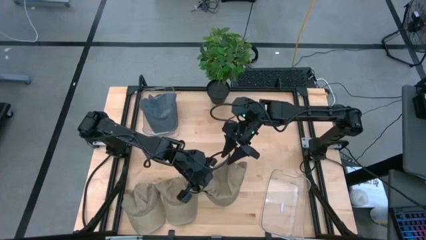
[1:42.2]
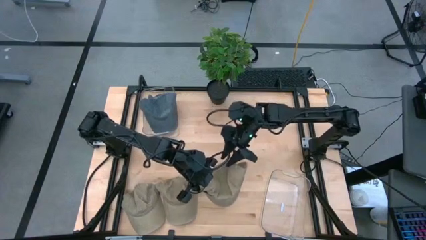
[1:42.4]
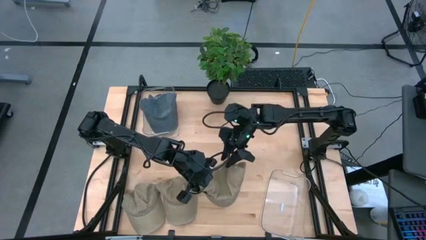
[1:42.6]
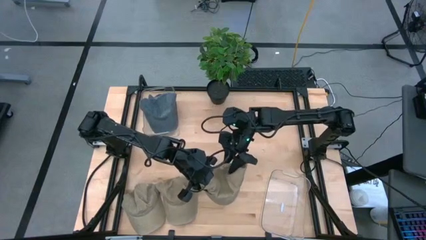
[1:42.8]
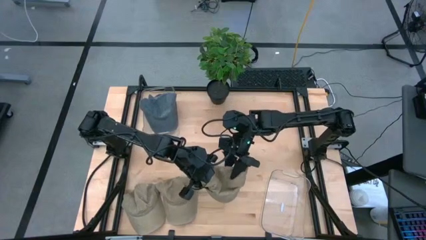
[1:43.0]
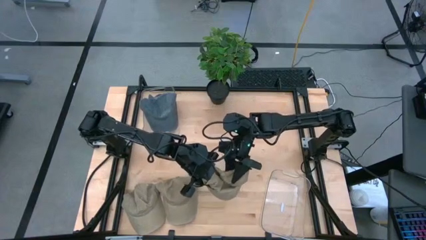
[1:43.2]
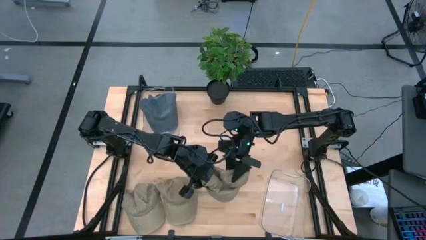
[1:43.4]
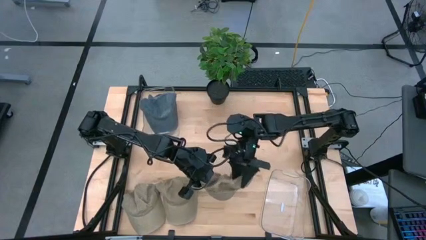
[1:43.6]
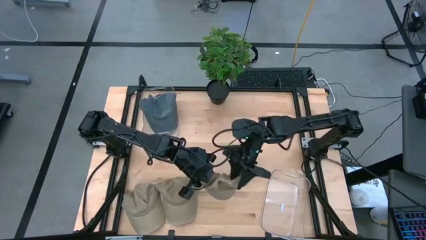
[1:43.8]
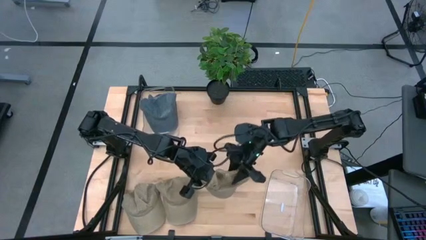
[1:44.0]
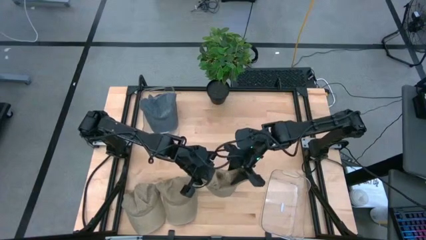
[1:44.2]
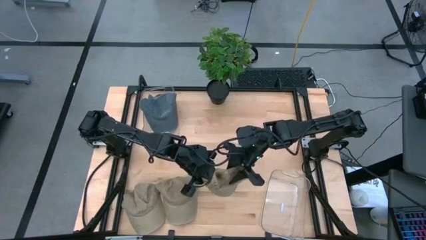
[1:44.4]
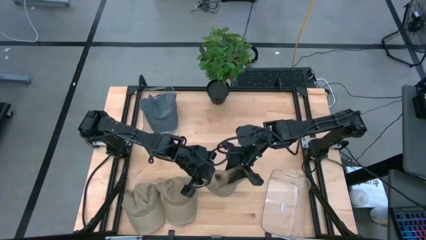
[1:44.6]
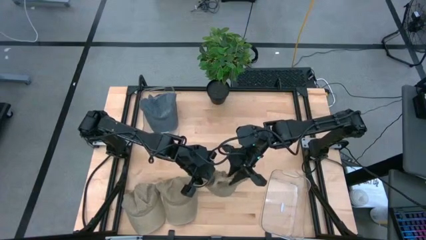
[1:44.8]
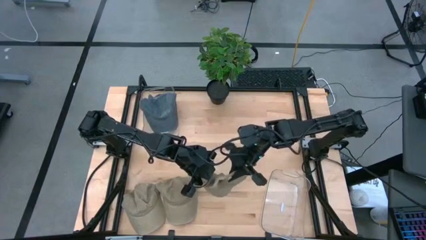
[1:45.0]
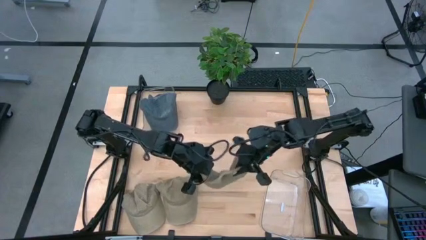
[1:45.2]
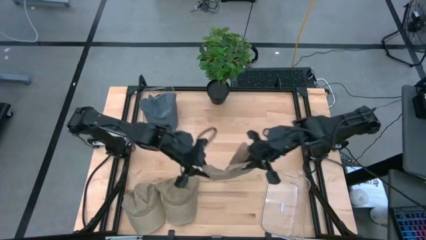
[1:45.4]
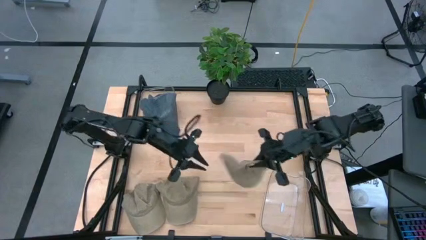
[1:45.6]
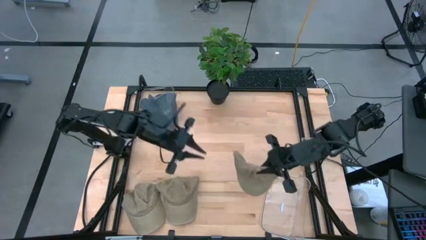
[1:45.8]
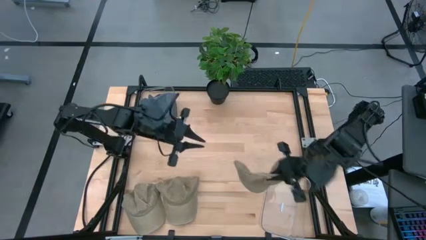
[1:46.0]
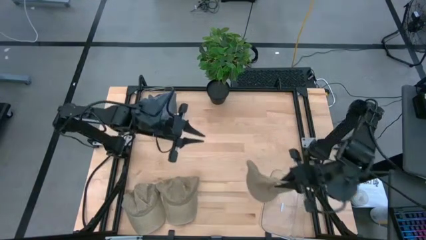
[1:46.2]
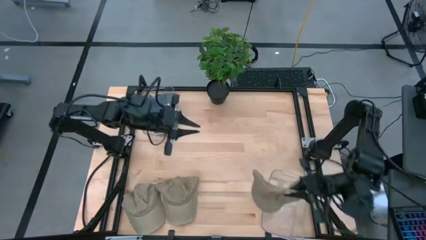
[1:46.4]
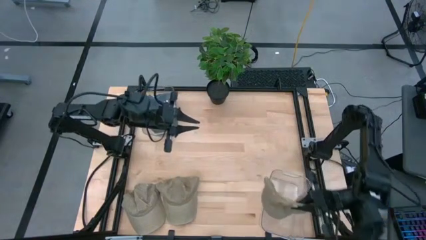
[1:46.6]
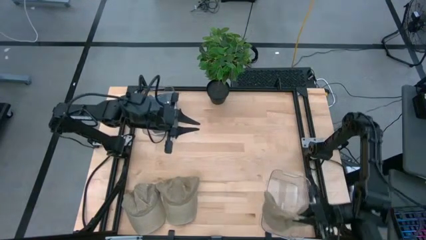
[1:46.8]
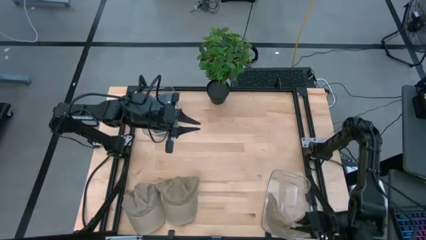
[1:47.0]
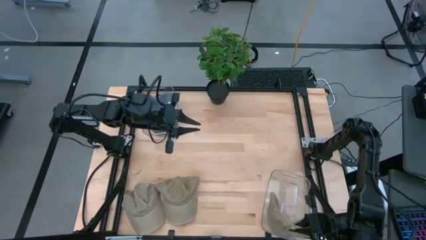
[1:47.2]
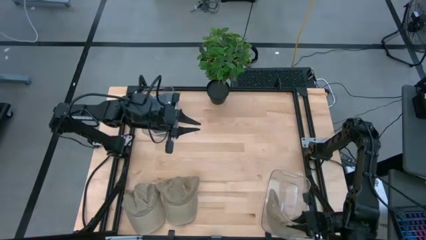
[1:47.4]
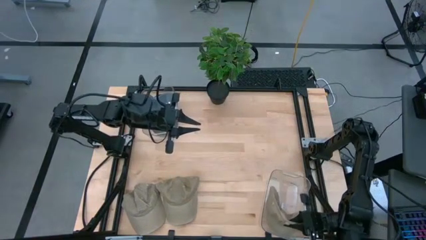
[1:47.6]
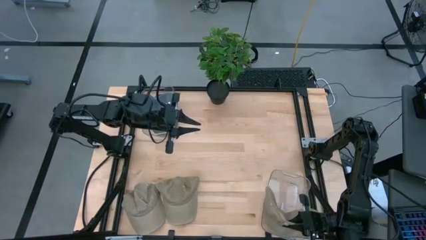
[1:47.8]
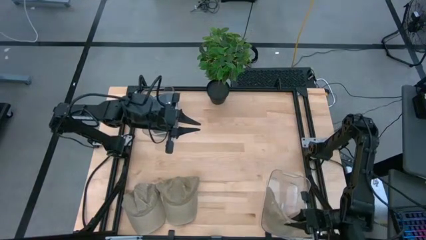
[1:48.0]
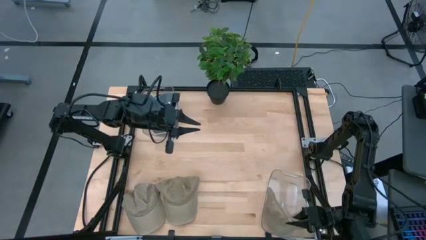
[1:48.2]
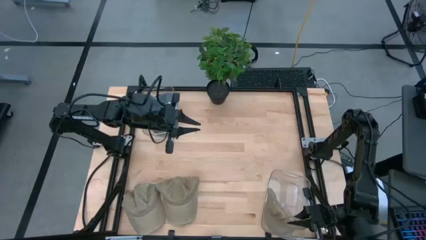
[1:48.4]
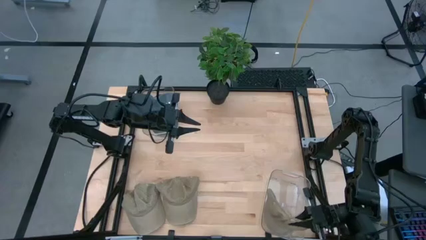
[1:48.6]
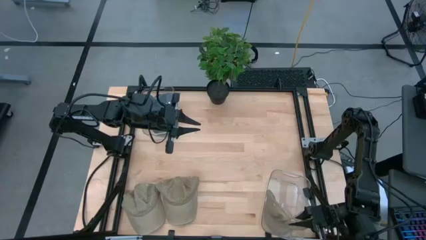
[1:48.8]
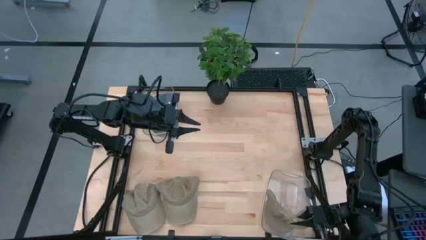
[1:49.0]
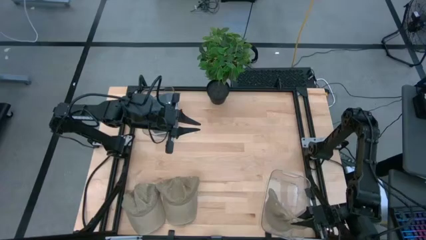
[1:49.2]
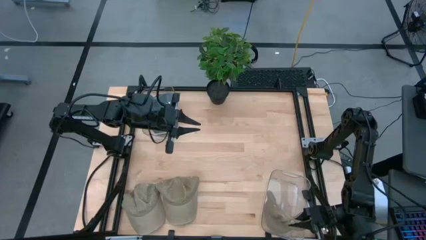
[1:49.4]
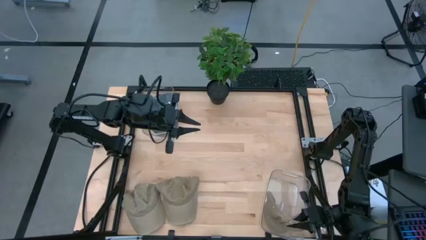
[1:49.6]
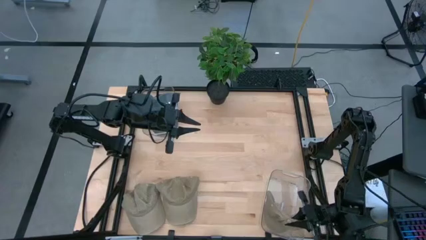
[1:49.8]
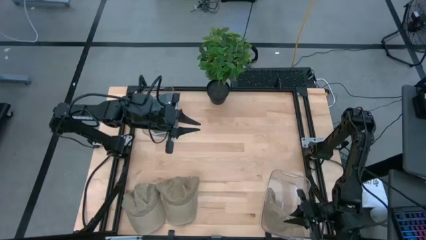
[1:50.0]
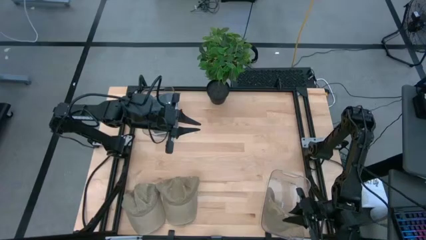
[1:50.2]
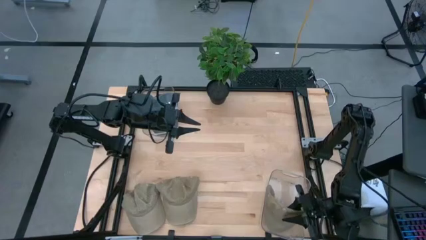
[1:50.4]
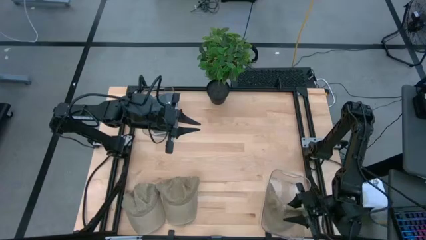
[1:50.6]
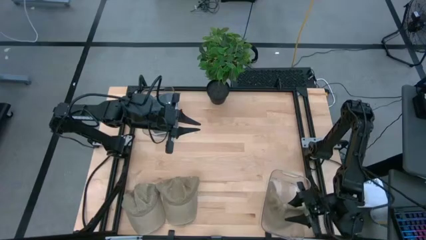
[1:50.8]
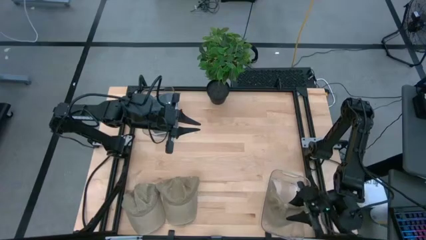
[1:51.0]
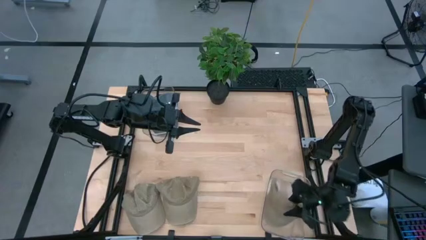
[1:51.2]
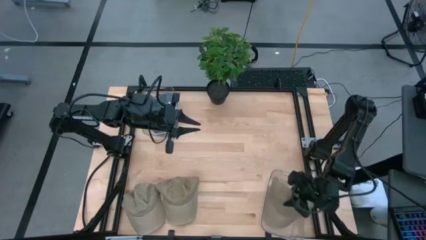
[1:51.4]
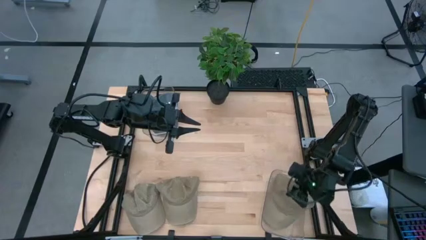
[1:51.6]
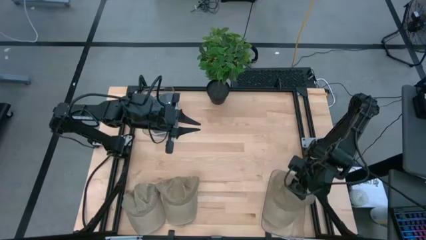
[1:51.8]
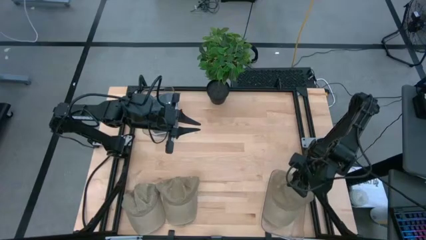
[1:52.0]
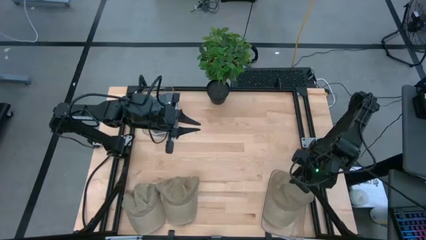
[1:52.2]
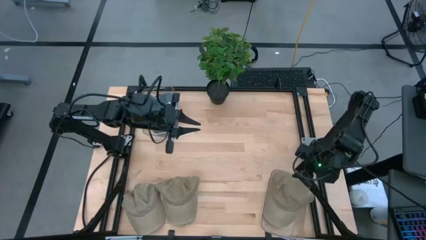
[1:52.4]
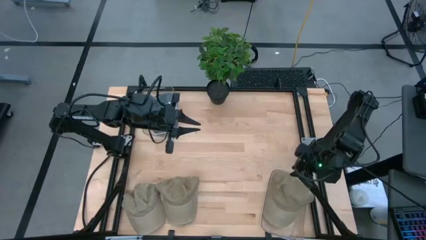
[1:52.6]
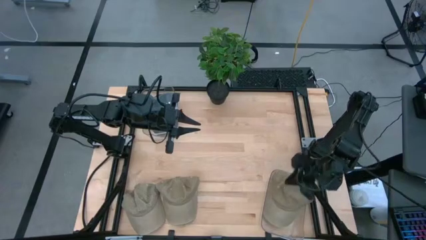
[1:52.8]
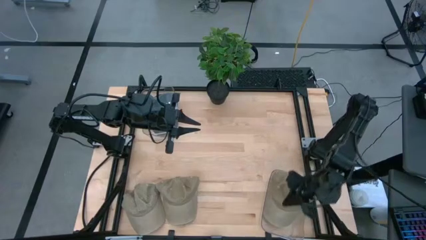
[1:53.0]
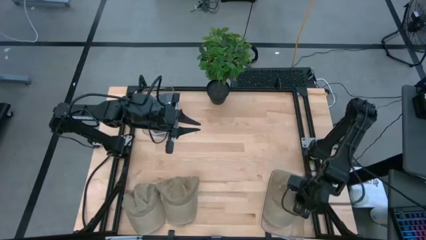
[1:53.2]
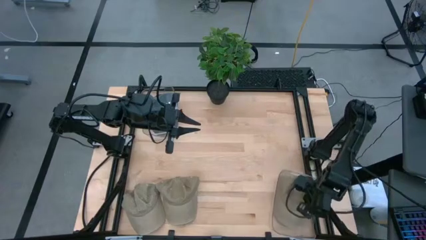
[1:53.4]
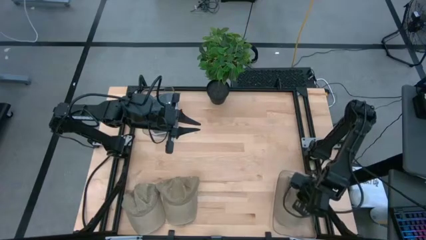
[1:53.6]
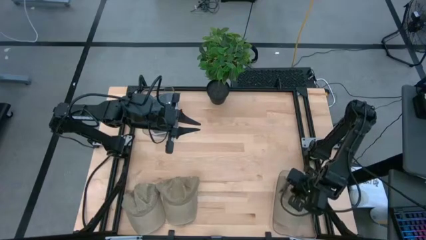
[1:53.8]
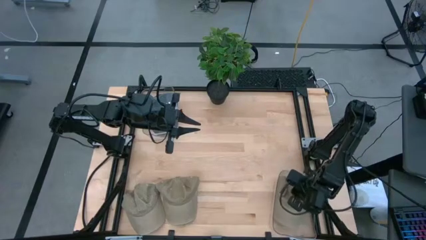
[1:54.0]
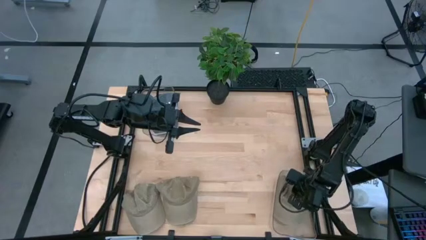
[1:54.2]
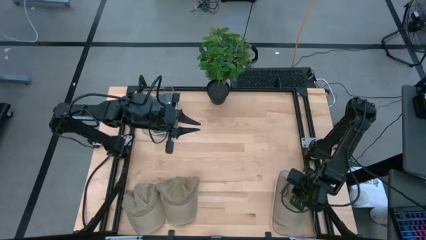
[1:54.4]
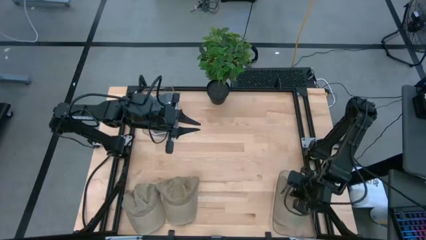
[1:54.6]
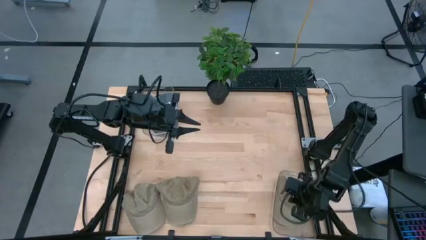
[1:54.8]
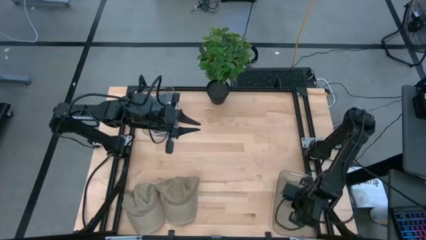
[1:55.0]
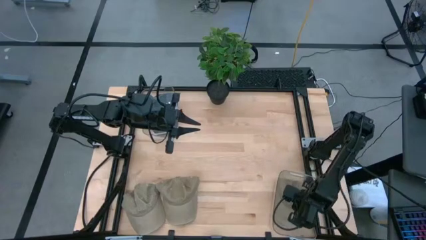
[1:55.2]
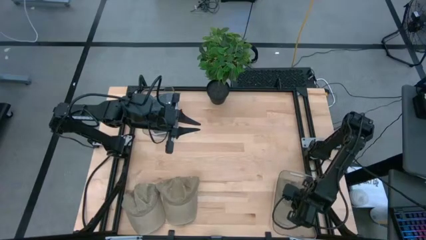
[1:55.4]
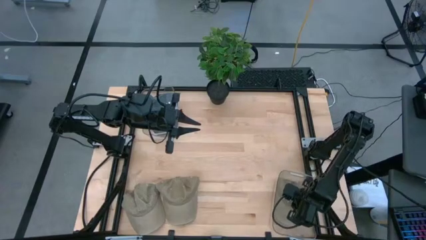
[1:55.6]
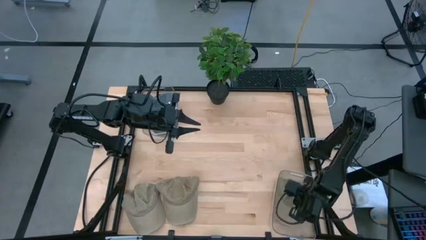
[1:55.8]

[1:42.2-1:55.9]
Task: Pick & Place hat
Put the top left brown cap into the right transparent bin

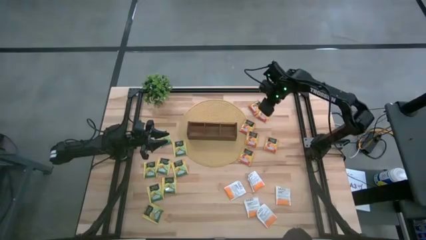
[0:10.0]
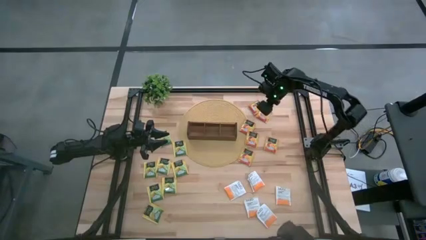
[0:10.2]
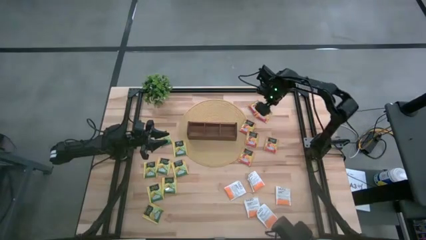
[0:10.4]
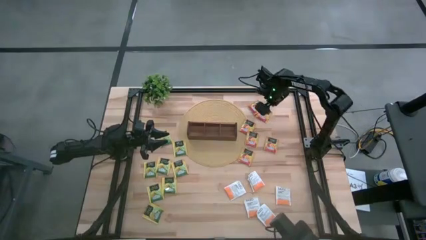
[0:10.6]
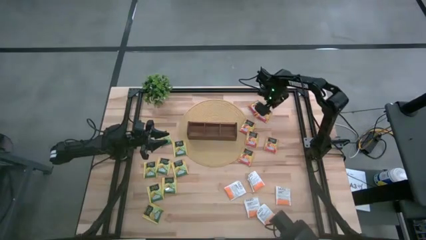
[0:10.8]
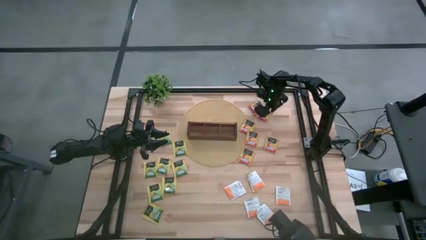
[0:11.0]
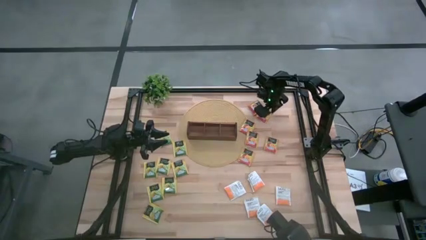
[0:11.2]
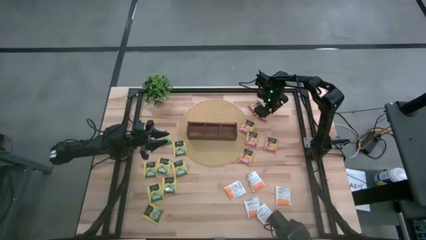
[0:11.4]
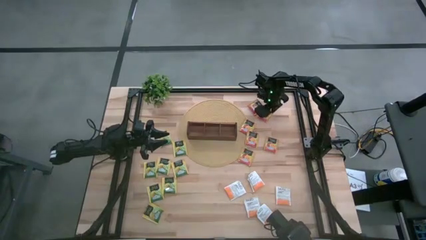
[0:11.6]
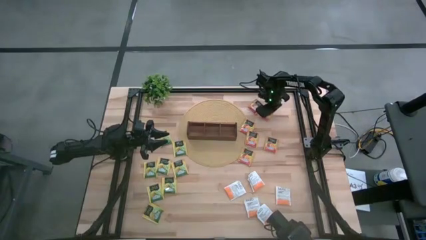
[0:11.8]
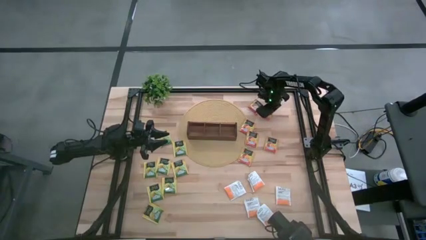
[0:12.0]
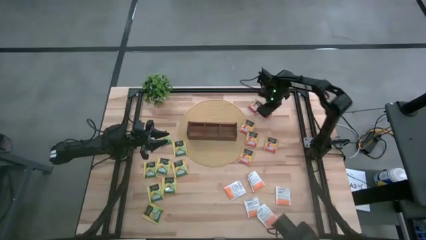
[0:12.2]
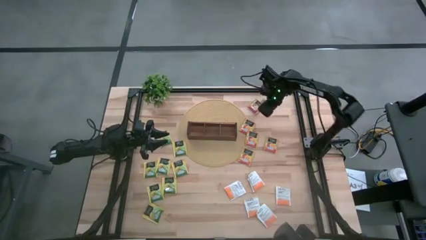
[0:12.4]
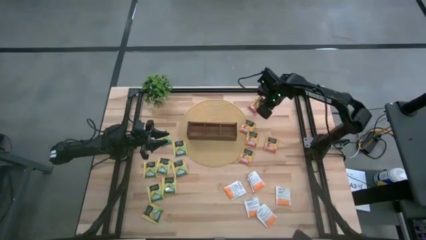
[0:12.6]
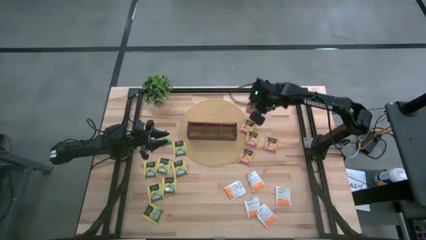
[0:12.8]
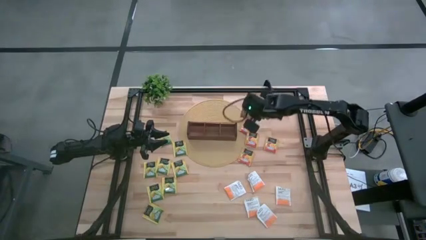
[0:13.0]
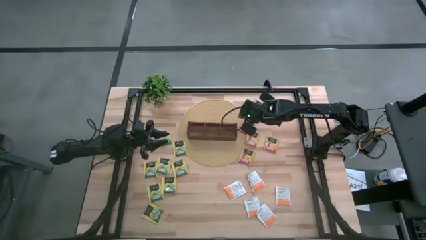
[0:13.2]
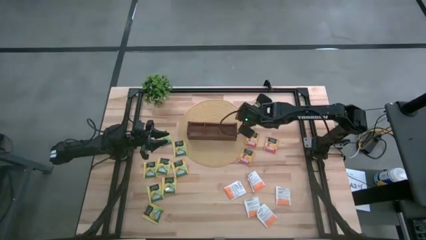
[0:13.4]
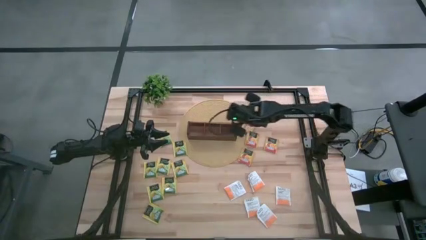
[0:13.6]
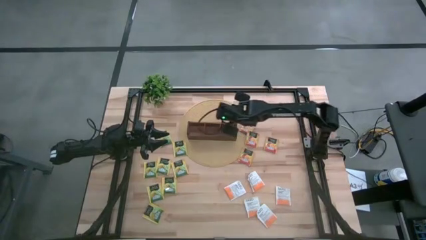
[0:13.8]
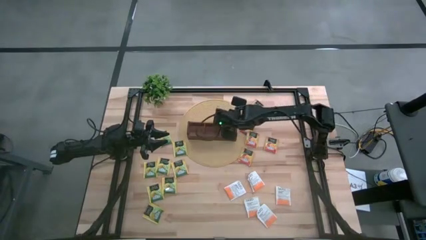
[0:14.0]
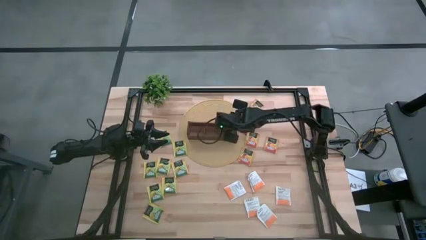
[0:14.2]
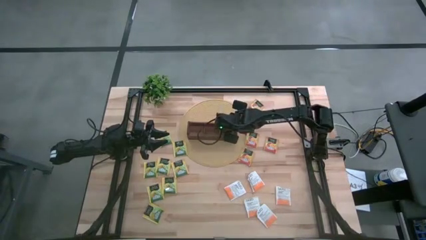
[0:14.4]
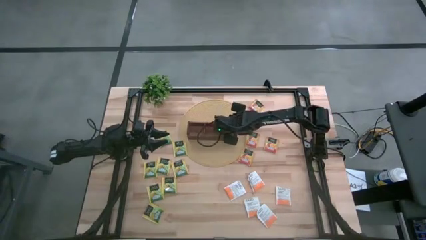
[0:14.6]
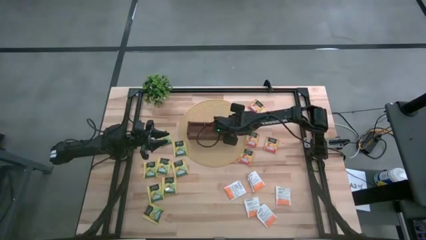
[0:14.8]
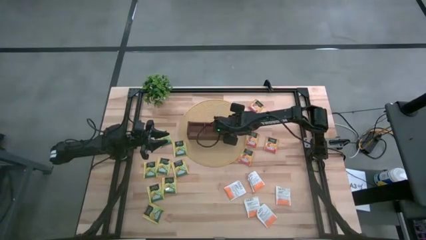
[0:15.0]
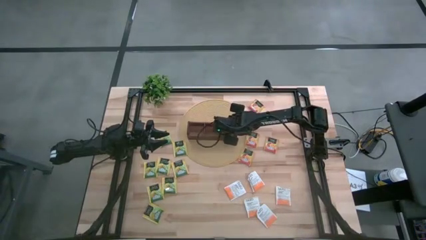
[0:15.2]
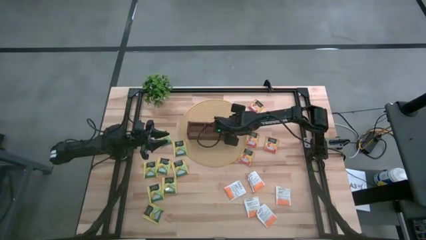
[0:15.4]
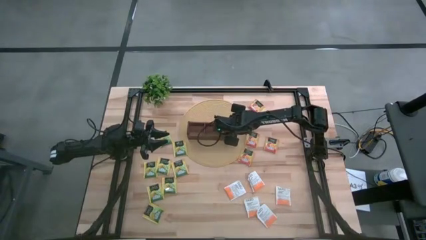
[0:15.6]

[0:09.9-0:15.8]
Task: Pick & Place Tea
Put the dark yellow tea bag into the right section of the wooden organizer
